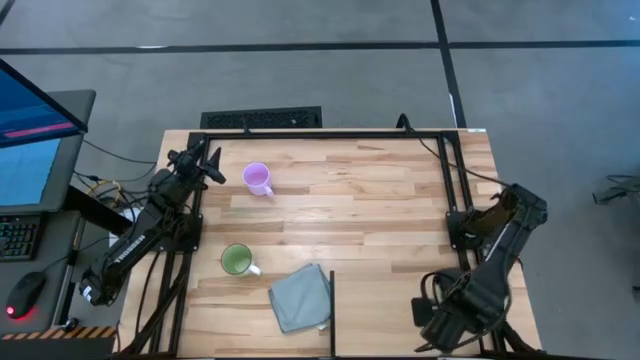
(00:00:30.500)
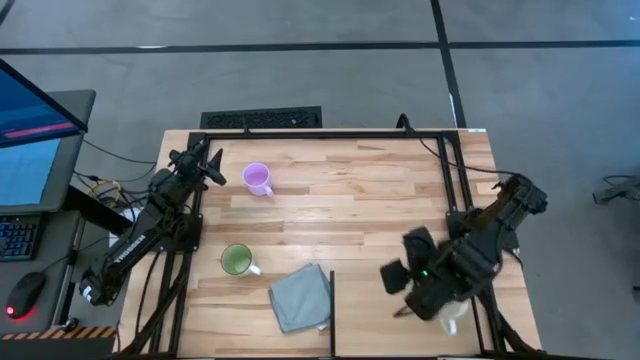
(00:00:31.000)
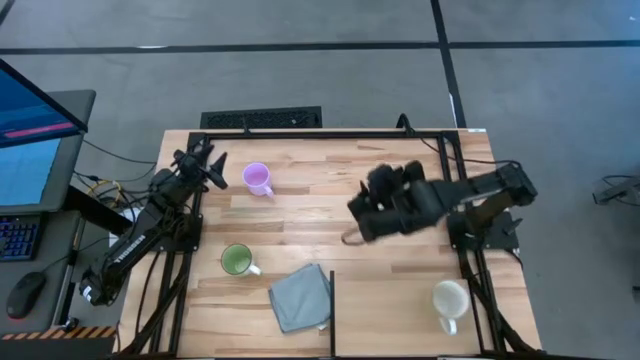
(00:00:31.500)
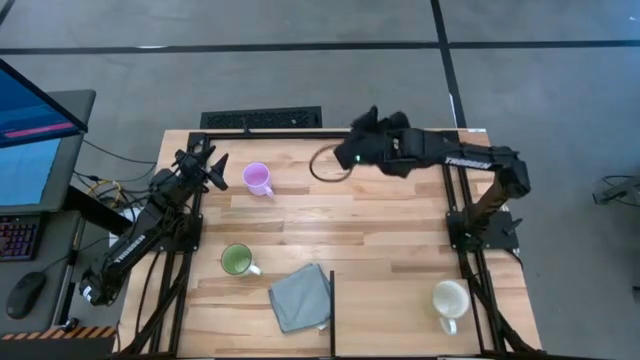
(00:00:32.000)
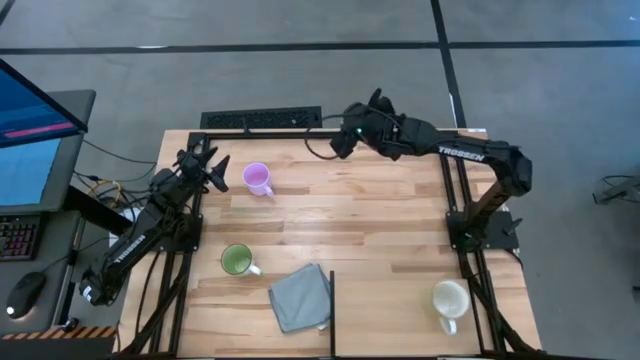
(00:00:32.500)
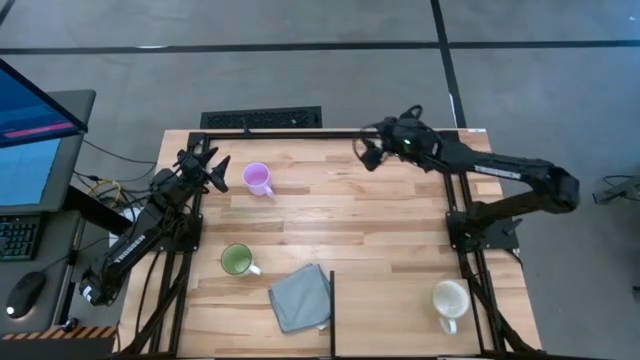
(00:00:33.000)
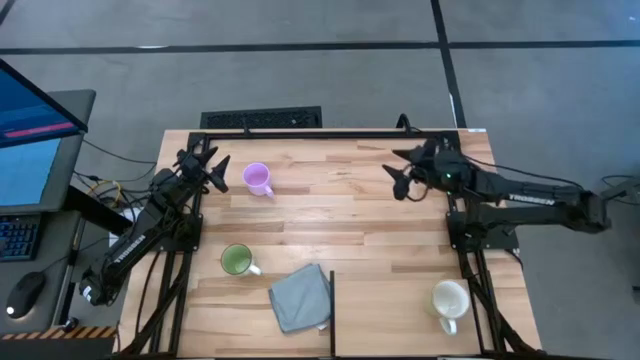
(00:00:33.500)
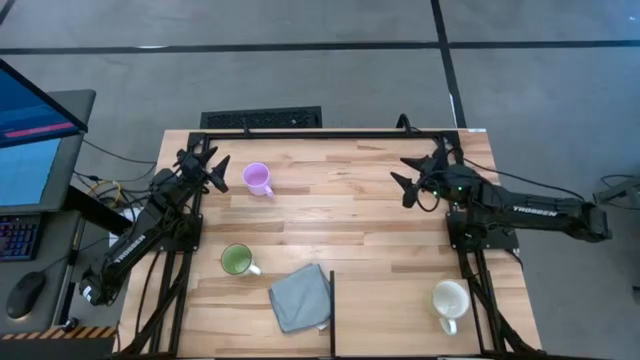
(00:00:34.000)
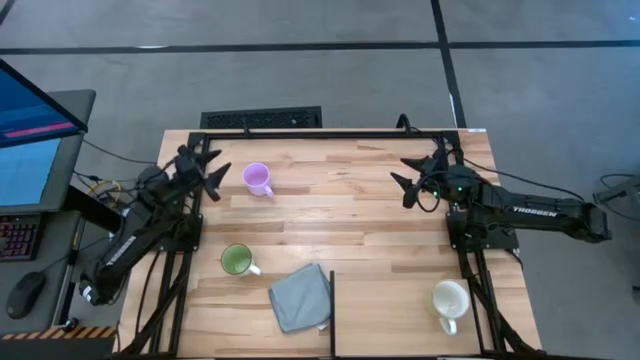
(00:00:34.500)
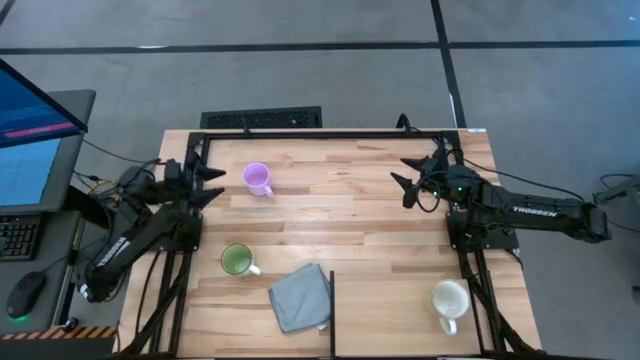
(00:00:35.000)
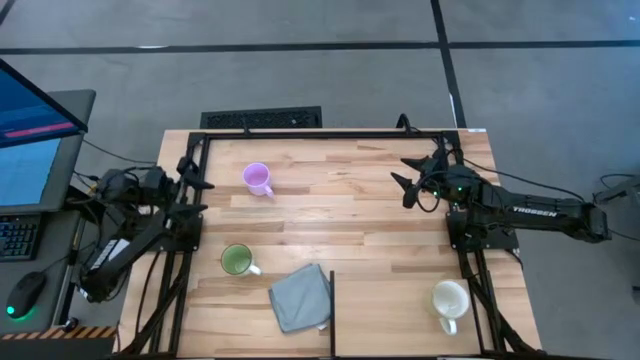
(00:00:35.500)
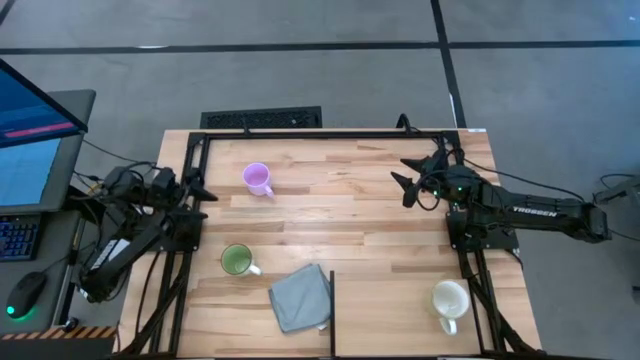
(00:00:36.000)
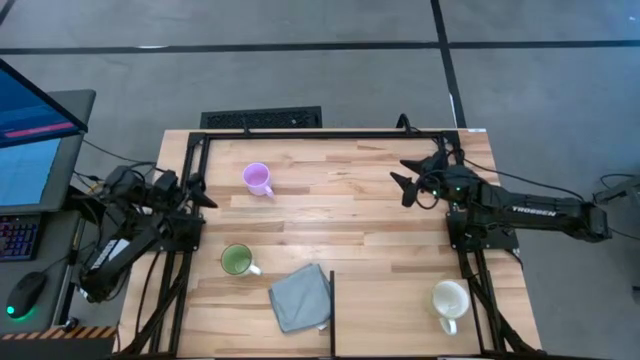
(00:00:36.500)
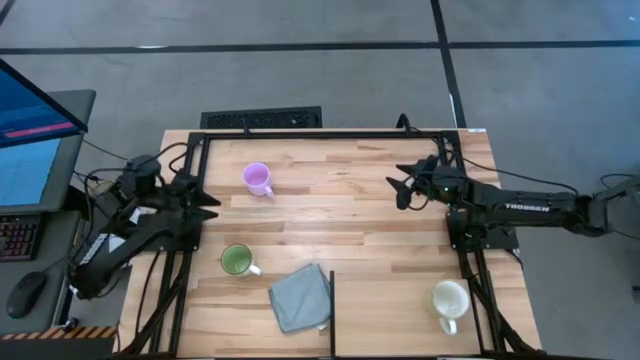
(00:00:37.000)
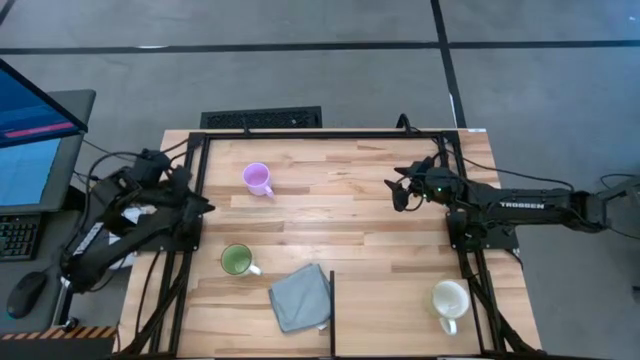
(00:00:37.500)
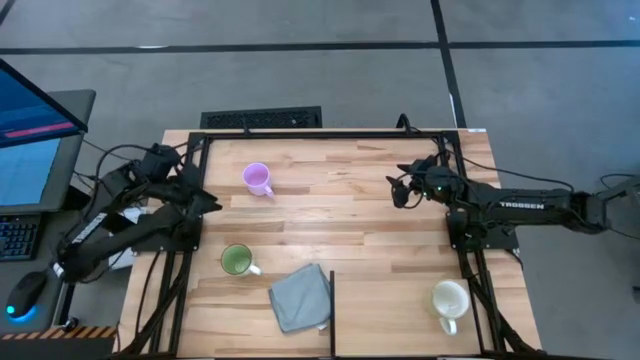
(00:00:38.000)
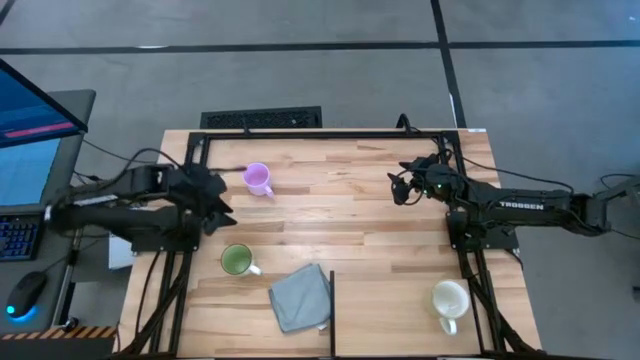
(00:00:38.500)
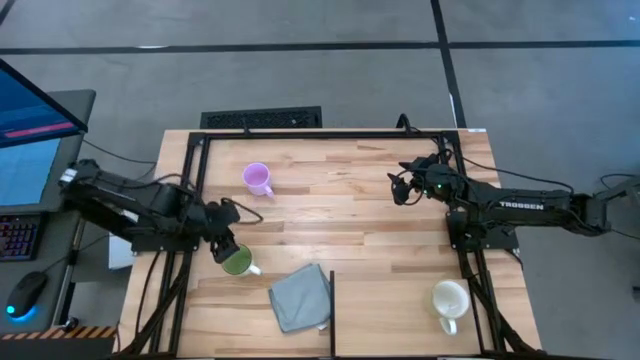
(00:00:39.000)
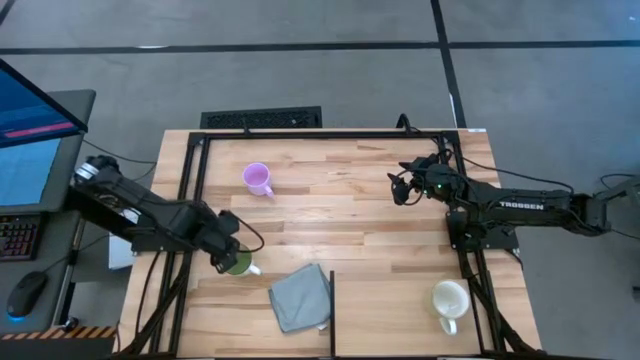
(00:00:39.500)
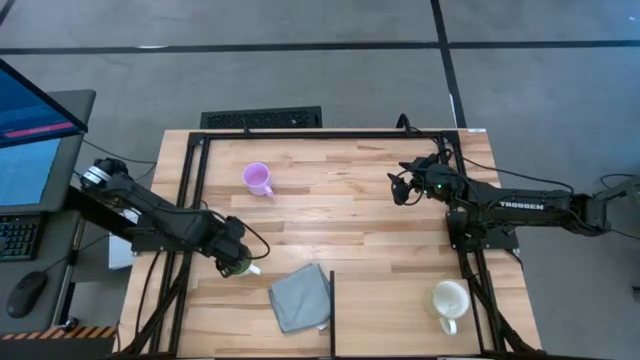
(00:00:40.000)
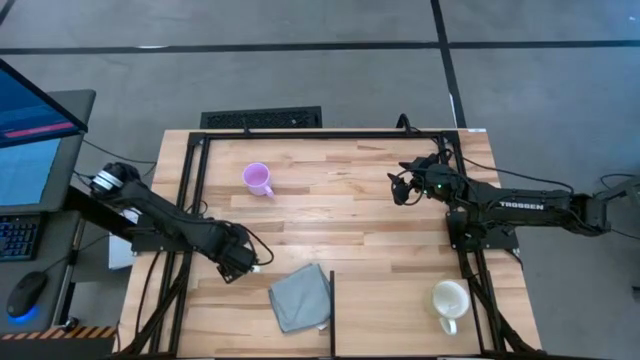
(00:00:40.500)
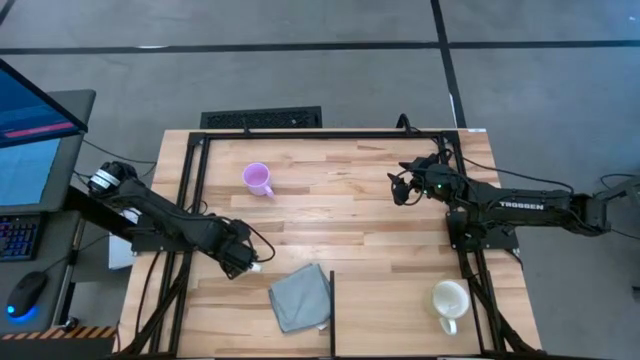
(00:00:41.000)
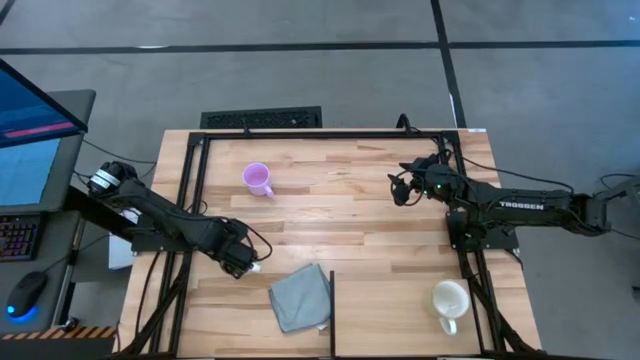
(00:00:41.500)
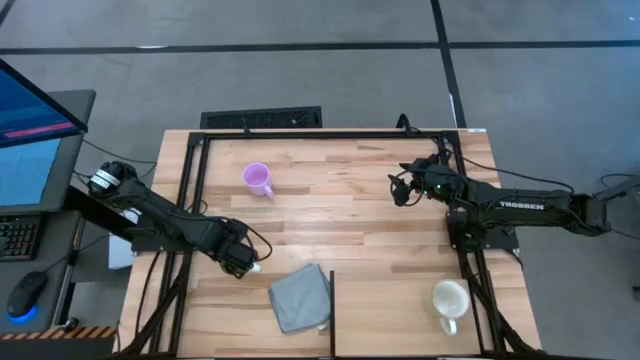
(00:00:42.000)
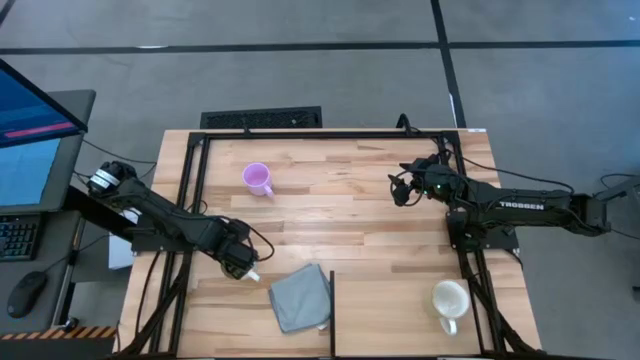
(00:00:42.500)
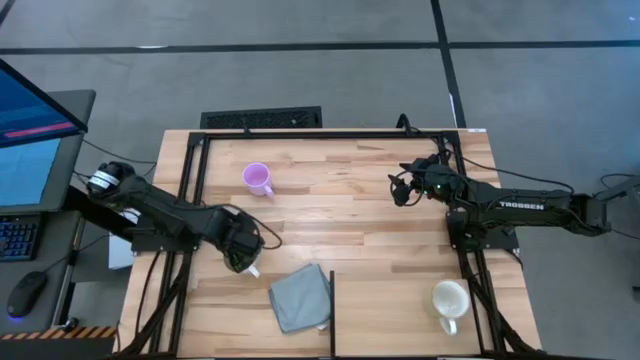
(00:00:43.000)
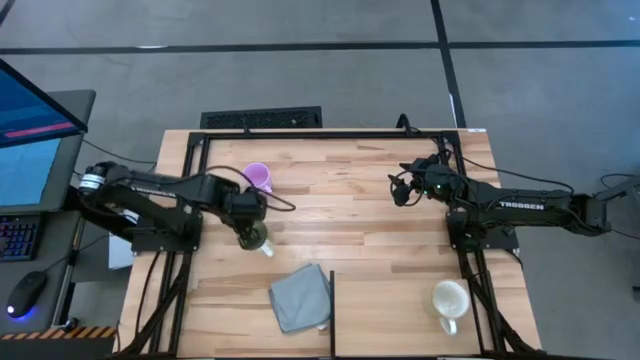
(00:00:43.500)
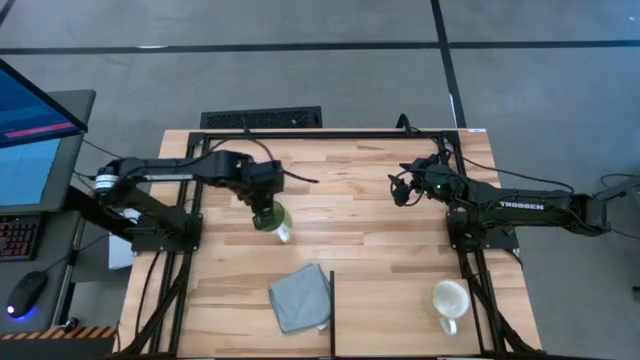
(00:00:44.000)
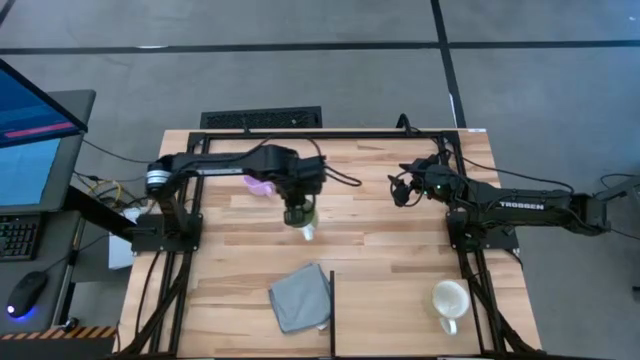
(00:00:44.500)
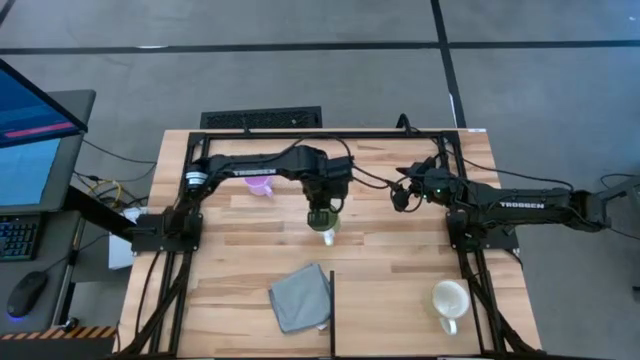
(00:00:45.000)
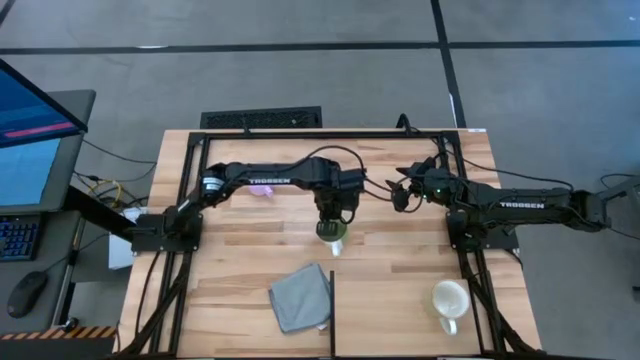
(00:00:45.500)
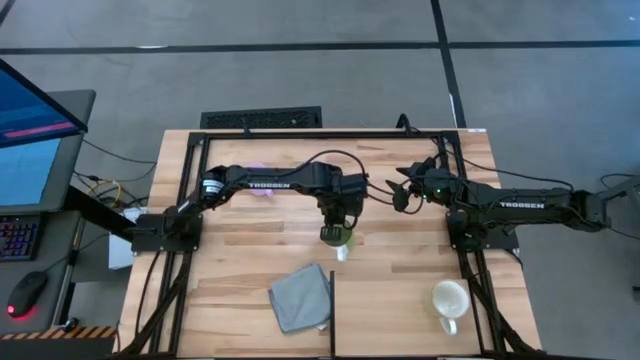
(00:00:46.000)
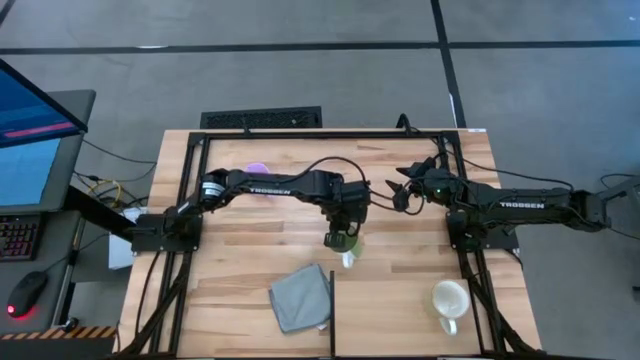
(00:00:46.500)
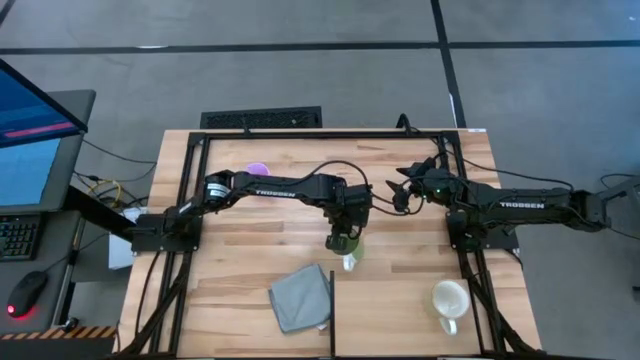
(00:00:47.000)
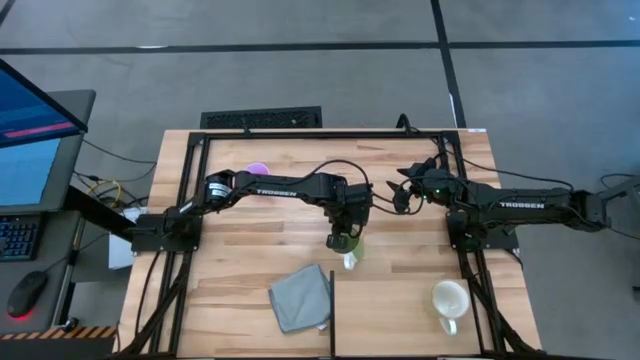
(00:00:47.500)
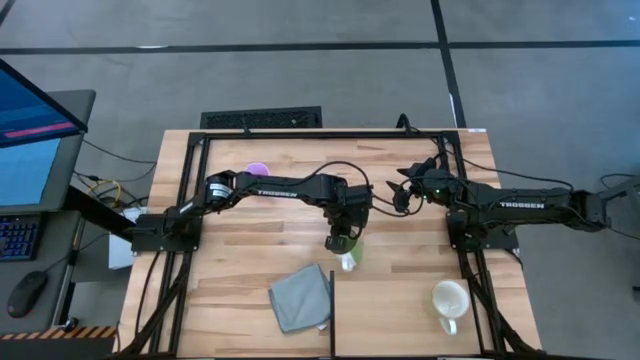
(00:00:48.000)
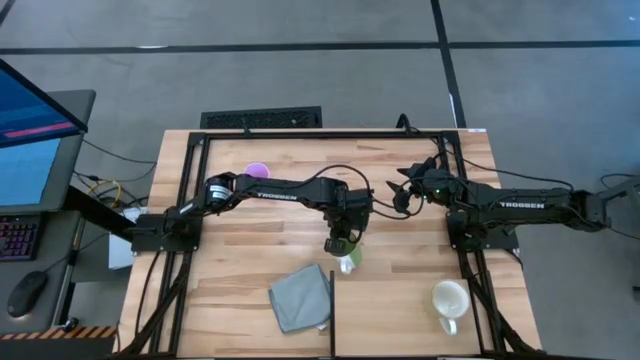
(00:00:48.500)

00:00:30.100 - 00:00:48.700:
Task: Stack small to large cups/mugs on shelf
Put the green mug on the shelf

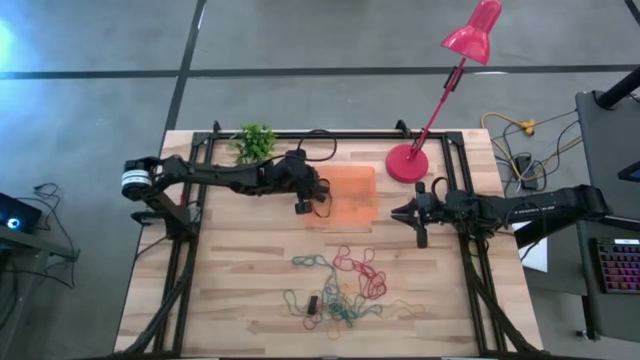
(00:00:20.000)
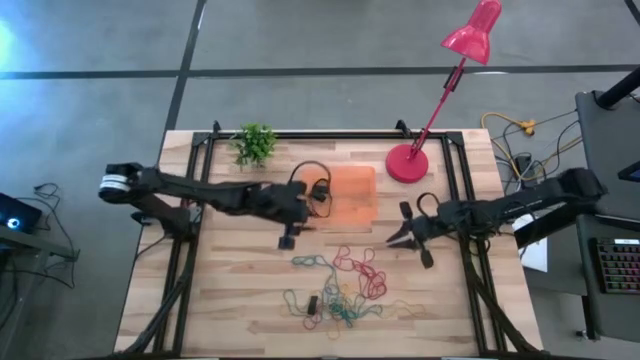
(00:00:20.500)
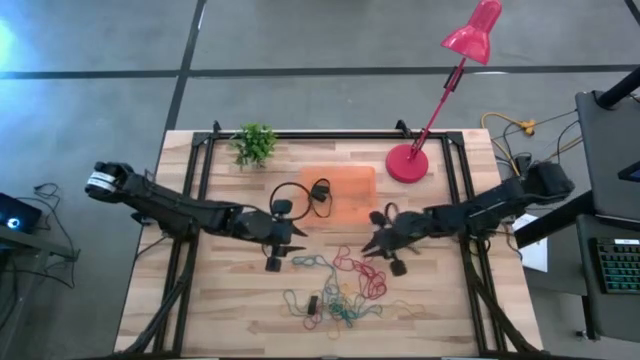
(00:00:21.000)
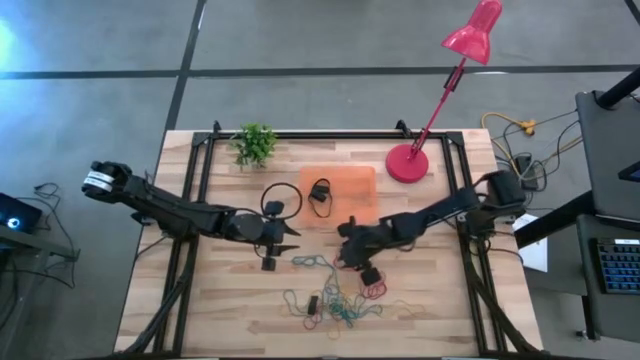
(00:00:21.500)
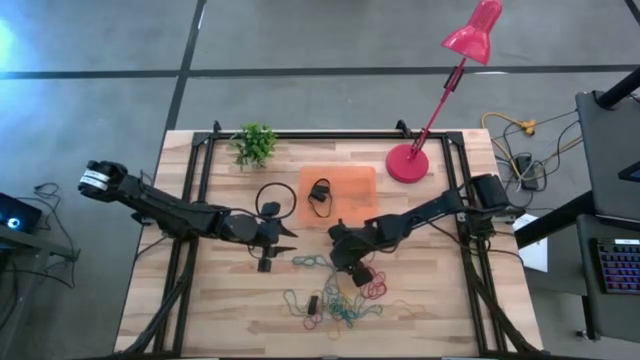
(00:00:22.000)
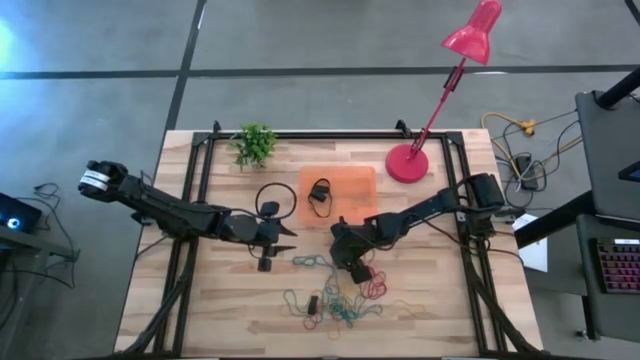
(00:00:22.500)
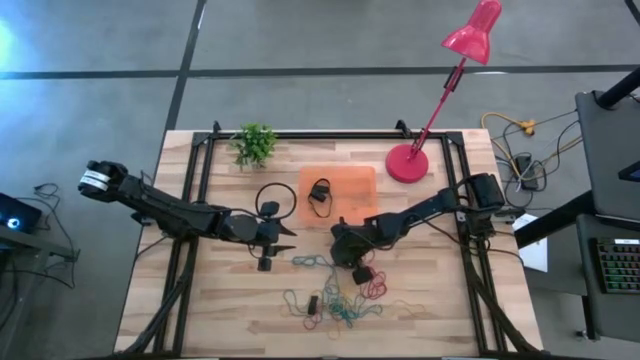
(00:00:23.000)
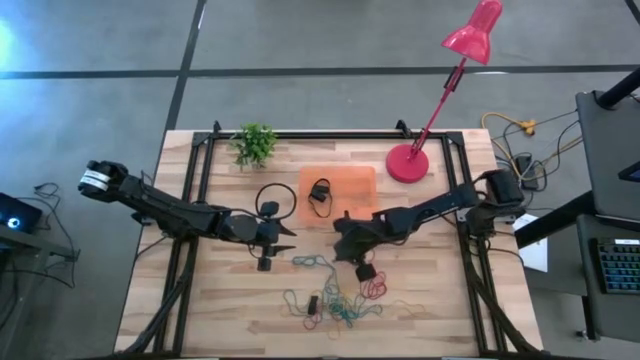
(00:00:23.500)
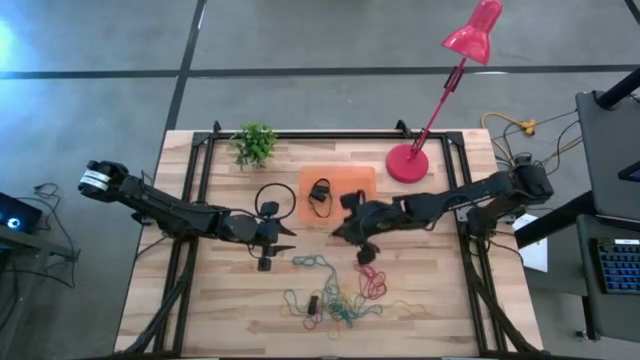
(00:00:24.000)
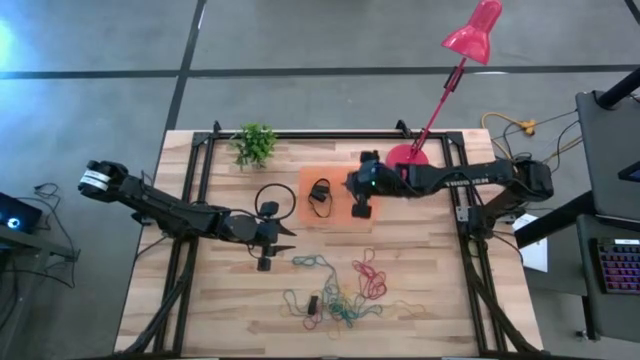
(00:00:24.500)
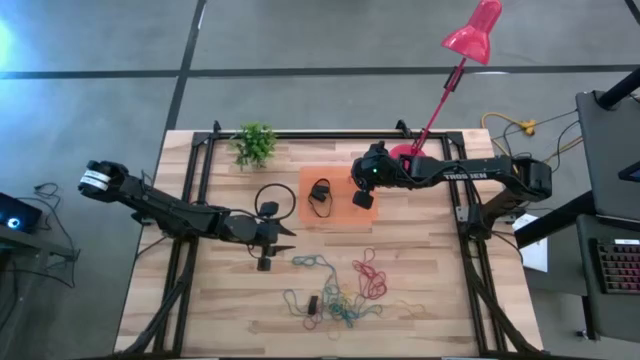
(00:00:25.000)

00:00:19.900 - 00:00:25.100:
Task: Pick and place rubber bands into bin
Put the red rubber band into the bin
